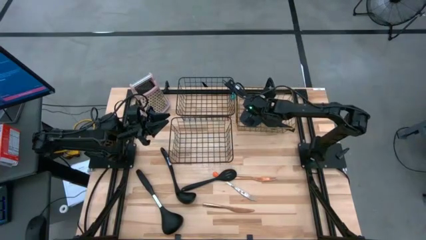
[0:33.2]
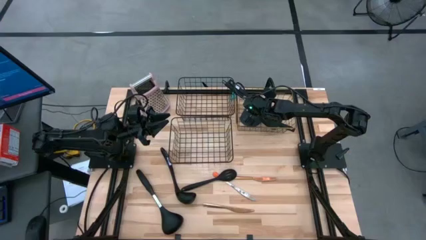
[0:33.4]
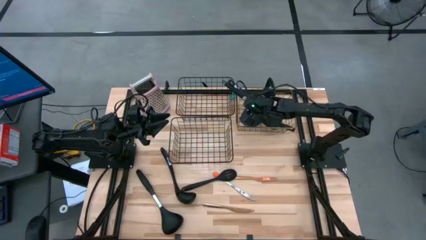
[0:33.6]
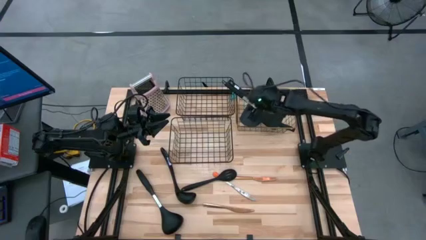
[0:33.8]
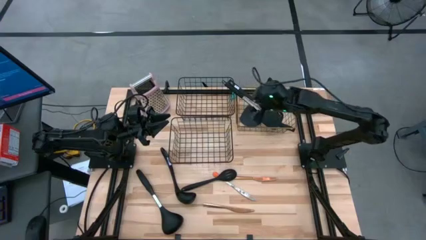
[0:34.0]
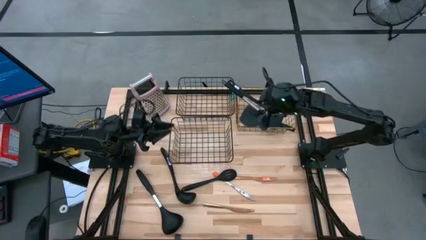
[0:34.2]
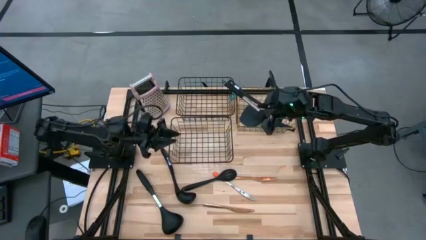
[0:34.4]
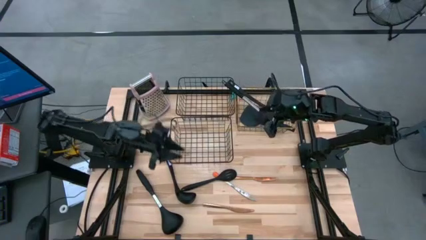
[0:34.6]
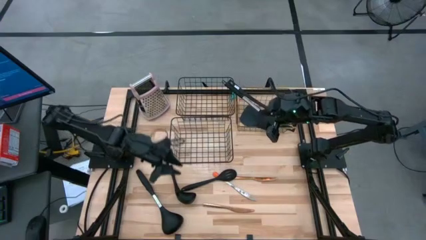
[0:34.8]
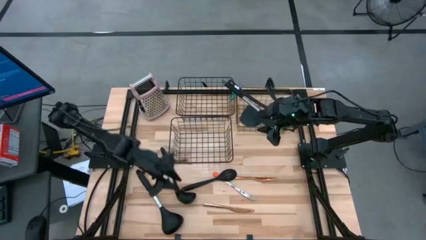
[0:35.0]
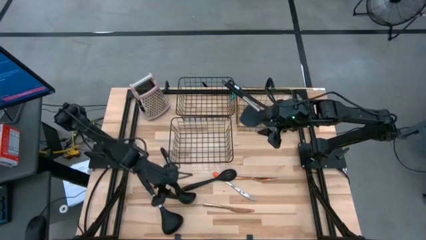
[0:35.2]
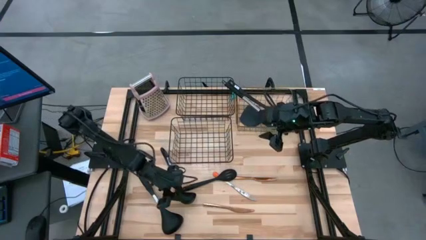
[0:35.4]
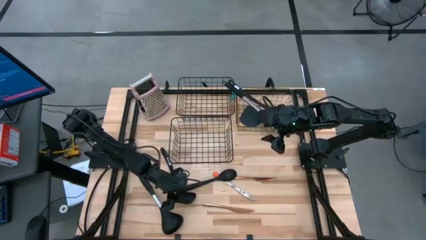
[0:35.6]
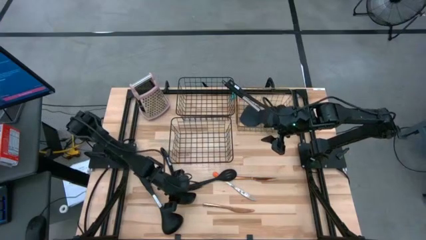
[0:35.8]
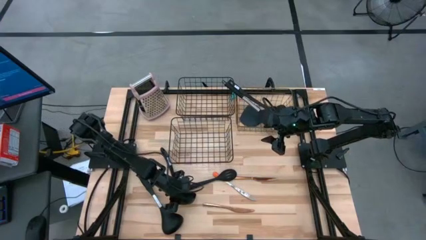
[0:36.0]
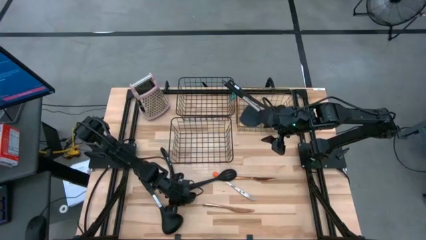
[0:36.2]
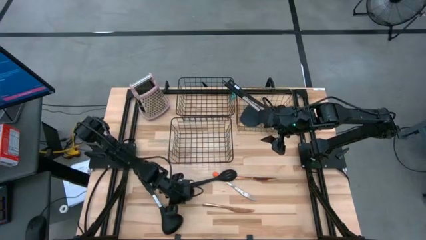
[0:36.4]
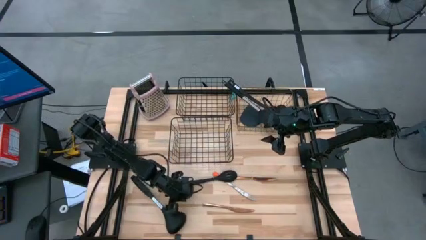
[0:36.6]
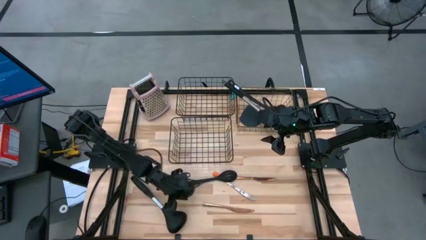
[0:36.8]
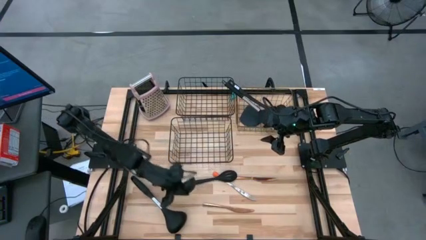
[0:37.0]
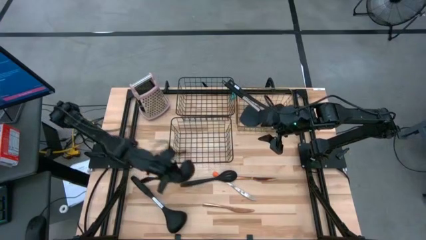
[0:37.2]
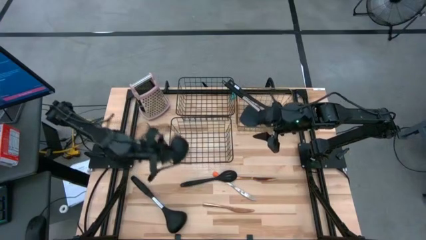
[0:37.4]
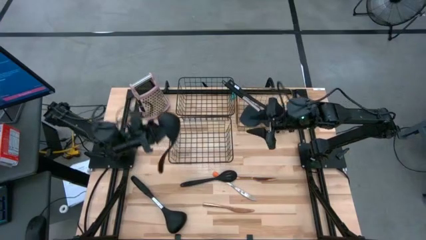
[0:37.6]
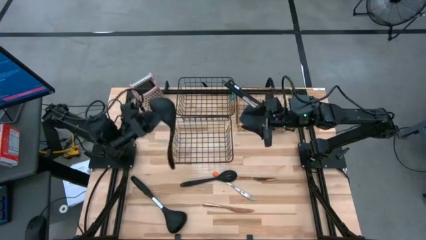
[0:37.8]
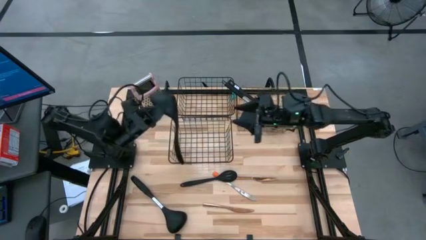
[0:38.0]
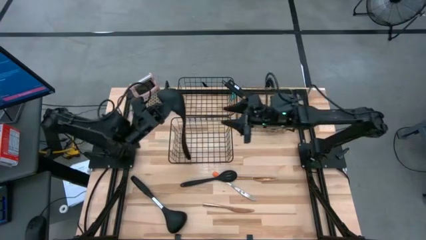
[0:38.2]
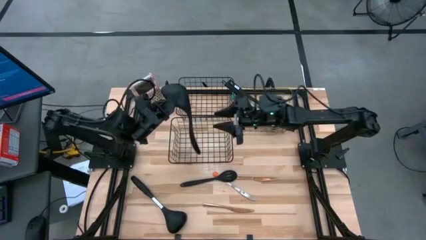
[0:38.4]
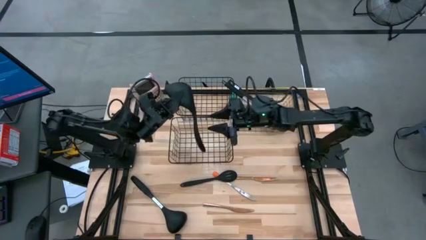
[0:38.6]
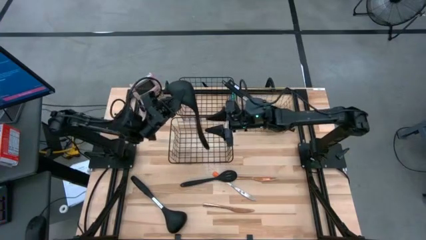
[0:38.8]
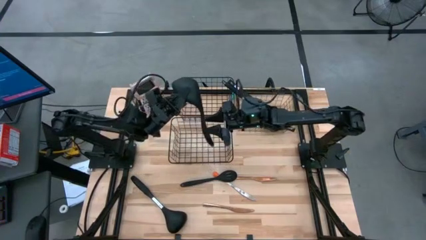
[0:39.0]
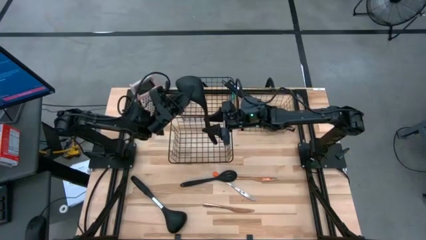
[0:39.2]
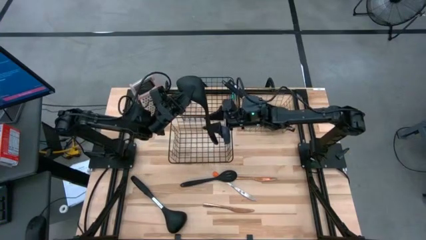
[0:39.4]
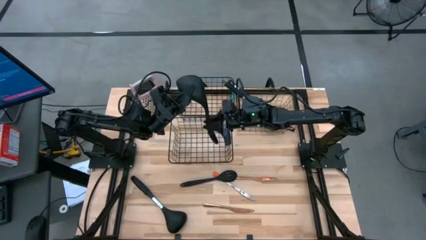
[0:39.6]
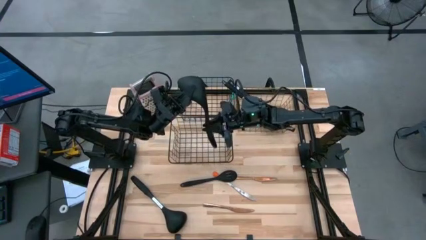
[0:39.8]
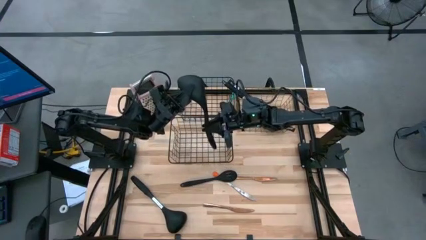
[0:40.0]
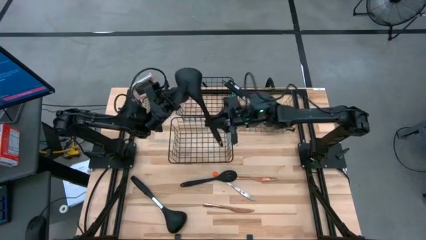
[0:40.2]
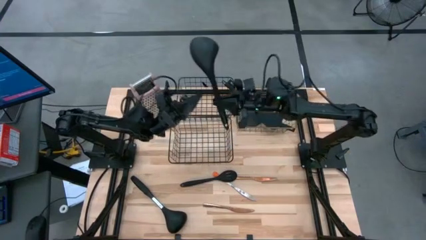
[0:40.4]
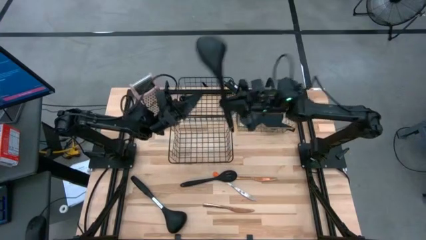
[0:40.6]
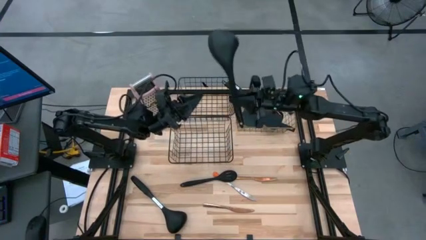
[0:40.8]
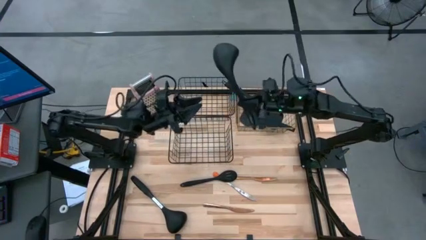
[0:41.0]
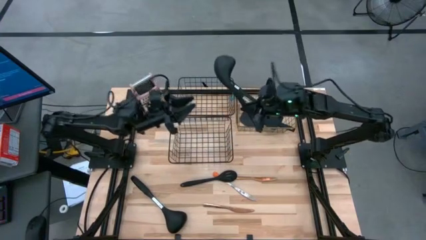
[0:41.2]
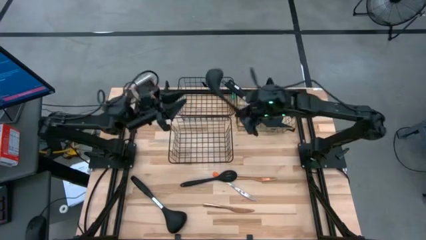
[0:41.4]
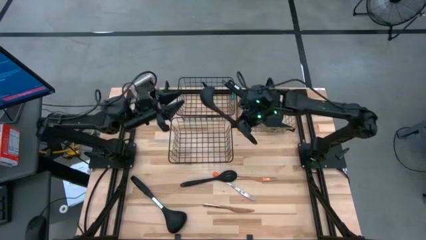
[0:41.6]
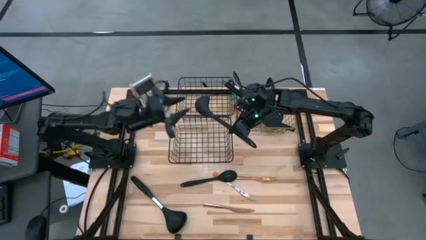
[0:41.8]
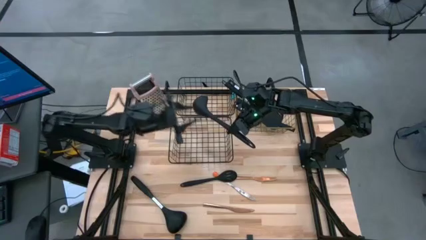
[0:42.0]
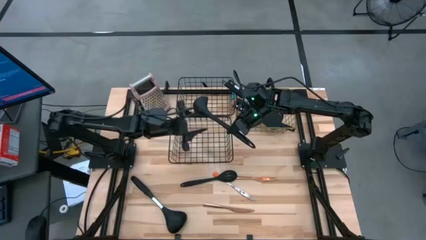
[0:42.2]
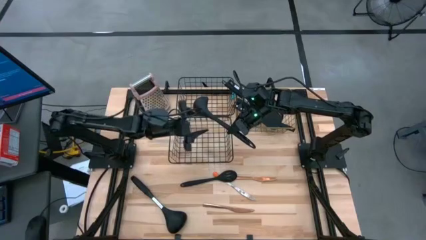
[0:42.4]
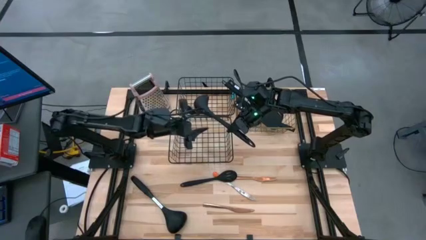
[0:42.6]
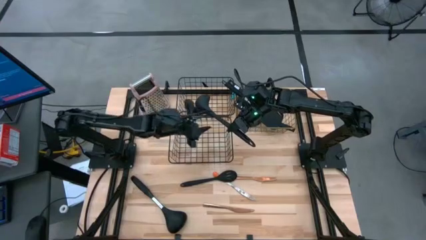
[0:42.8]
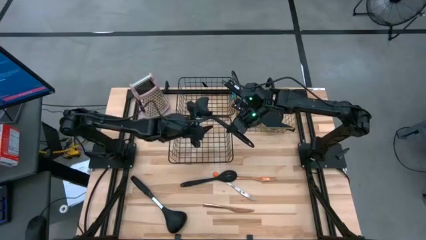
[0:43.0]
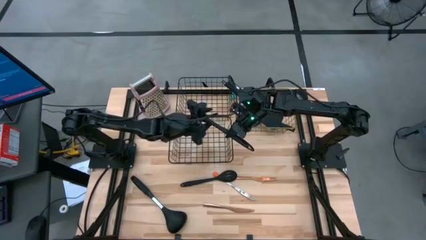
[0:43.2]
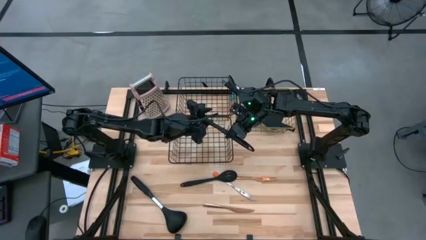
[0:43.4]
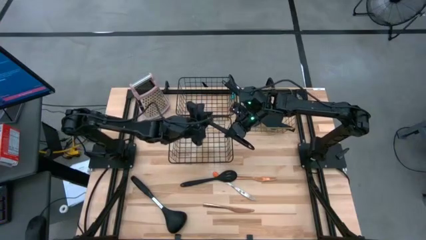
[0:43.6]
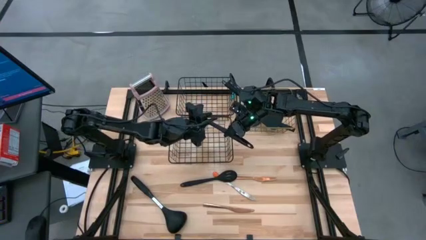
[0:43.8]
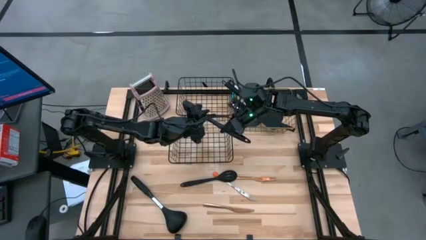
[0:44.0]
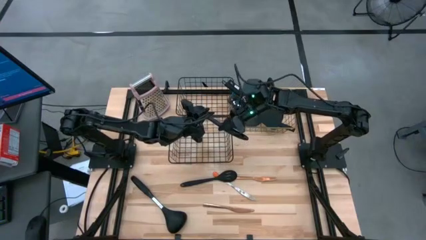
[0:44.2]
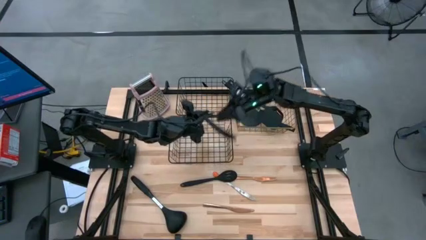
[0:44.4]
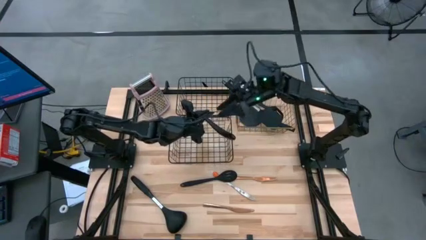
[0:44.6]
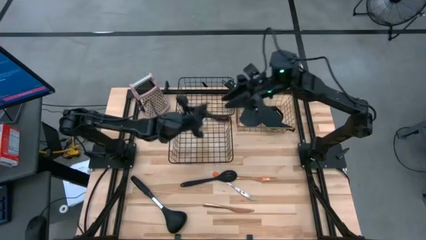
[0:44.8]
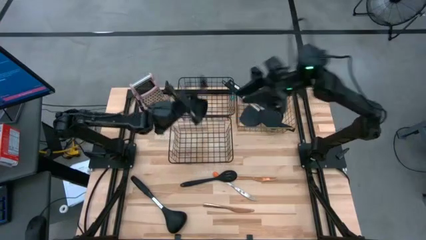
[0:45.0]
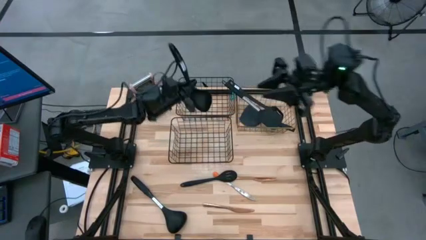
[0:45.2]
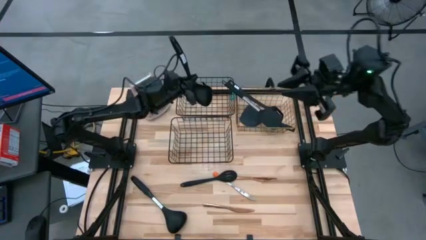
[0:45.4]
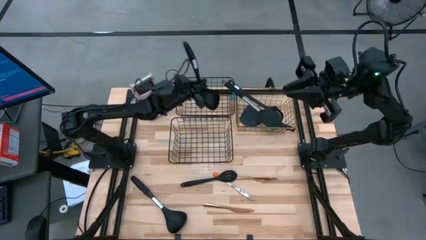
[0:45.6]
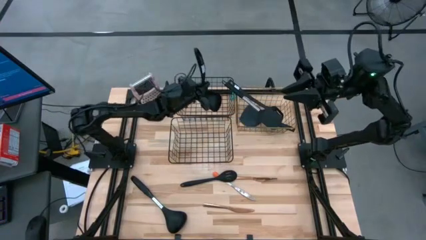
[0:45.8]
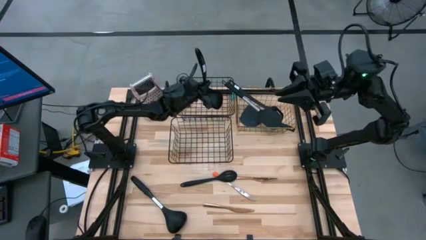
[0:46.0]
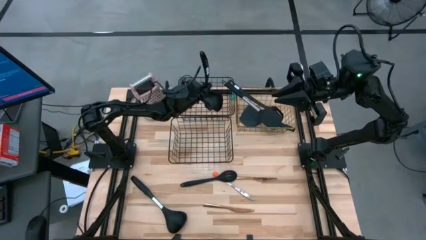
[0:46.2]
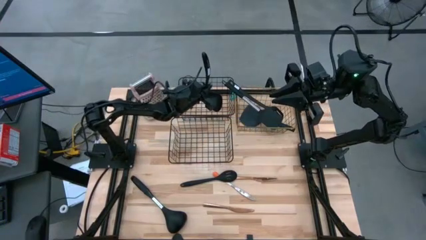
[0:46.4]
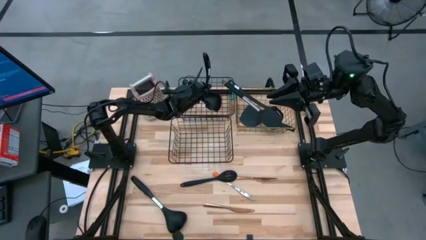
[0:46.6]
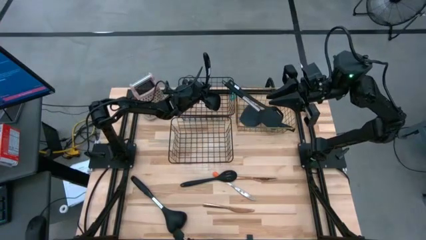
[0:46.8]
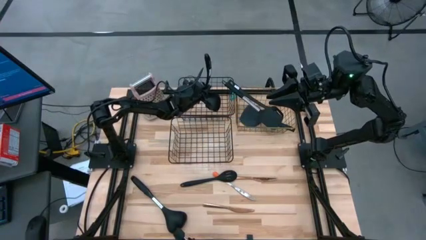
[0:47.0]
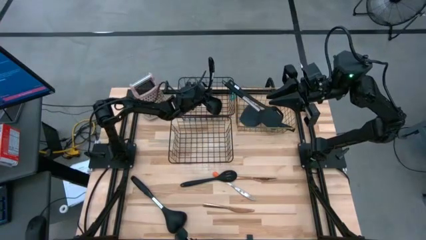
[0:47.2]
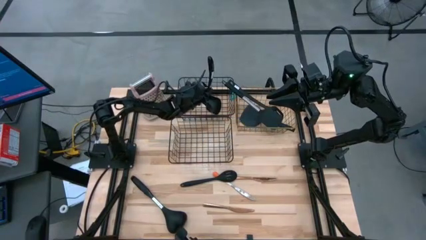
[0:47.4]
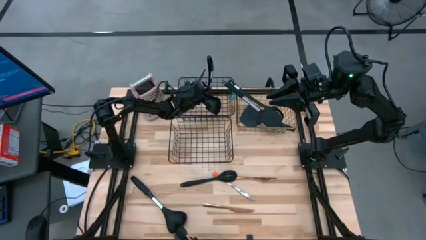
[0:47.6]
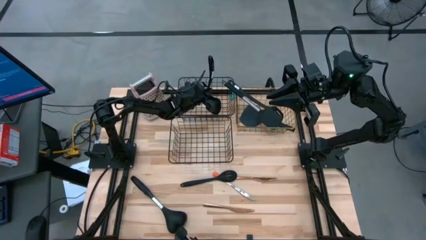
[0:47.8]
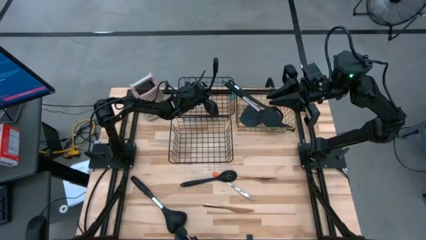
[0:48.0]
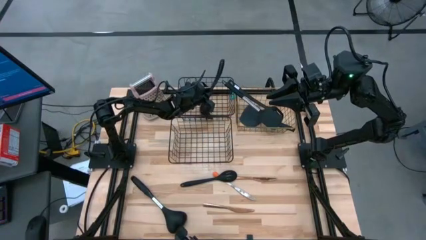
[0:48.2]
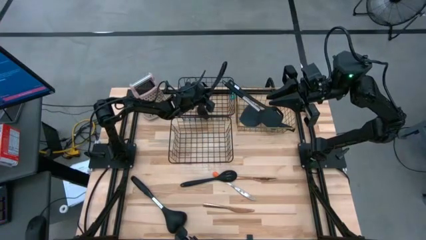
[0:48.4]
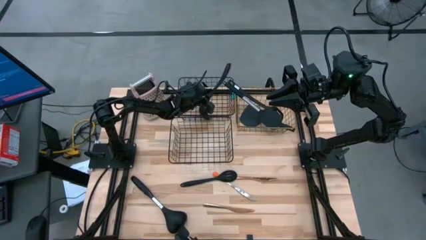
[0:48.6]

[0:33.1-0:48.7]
Task: Pick & Place Kitchen Items
Put the serving spoon into the top left wire basket

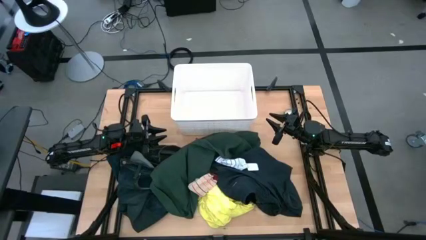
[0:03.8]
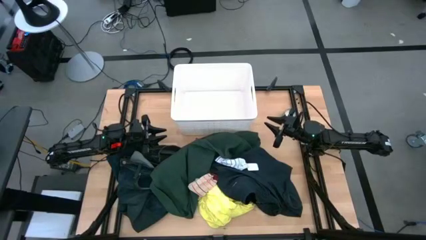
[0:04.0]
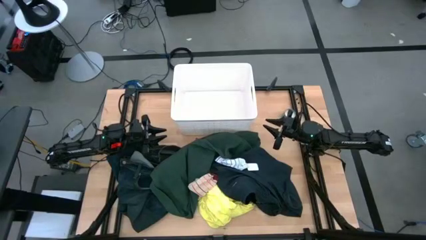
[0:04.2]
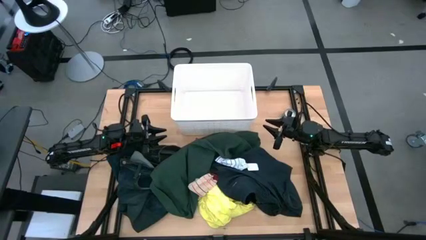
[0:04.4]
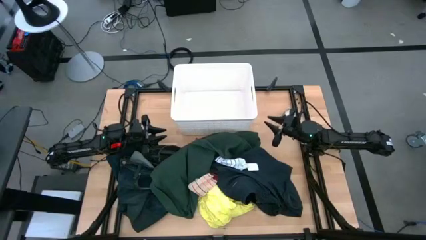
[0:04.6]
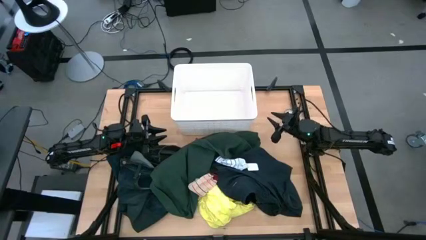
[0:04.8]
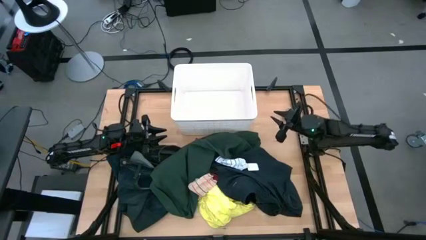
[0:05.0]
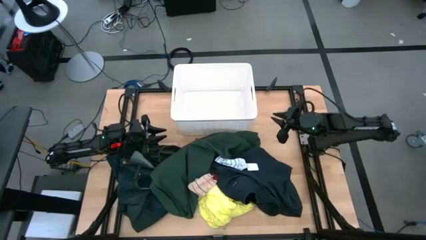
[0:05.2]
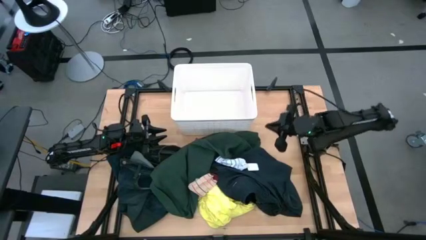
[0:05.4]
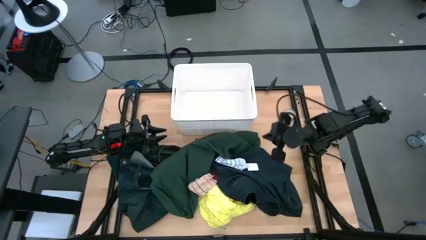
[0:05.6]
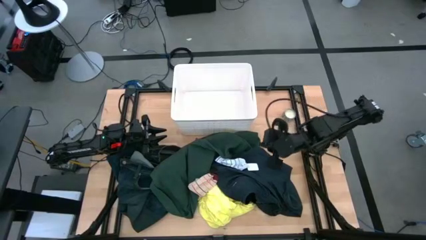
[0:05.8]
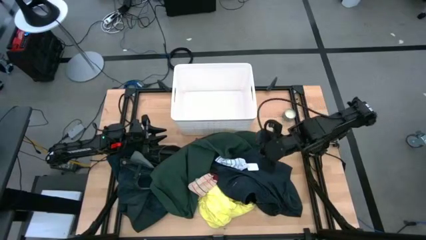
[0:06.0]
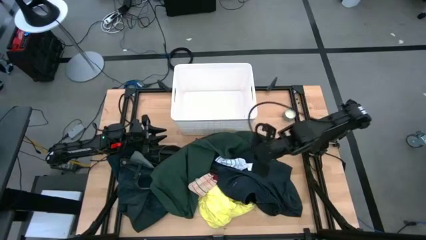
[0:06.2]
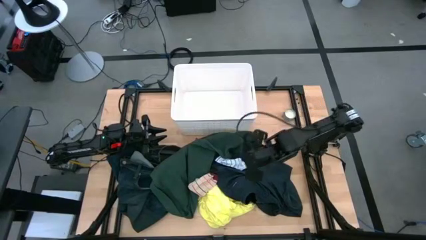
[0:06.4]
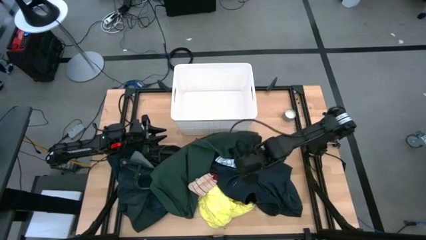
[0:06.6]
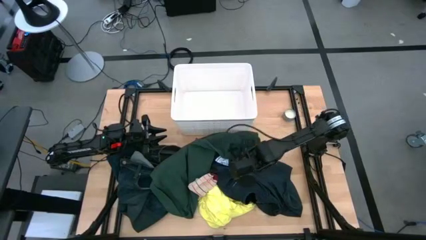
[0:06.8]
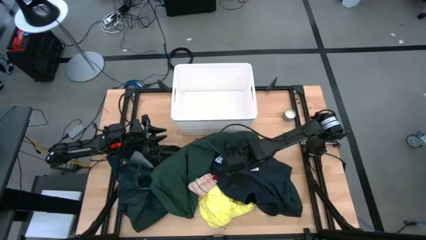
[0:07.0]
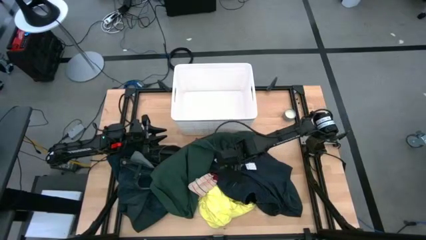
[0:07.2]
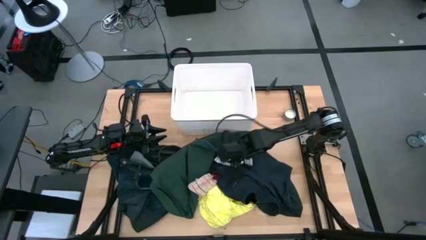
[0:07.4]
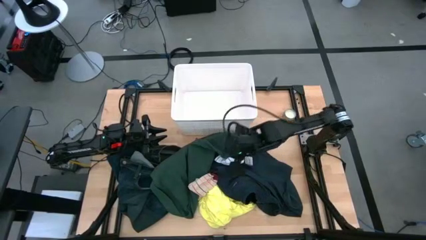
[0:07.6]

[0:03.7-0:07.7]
Task: Sort clothes
Put the white sock into the white bin
